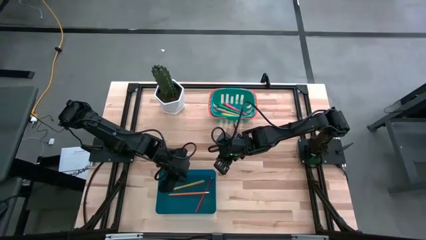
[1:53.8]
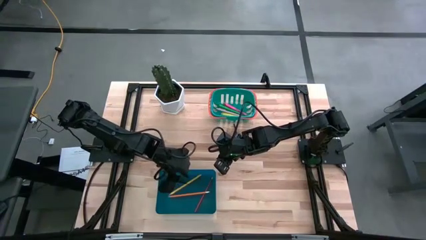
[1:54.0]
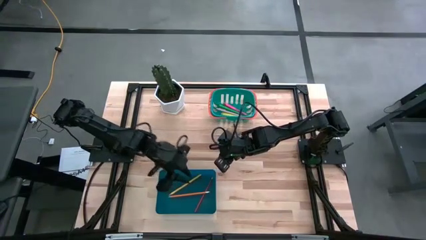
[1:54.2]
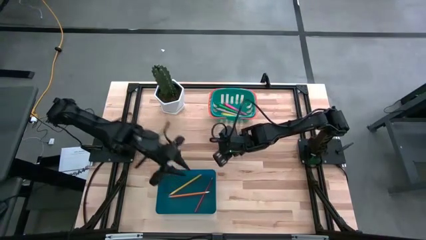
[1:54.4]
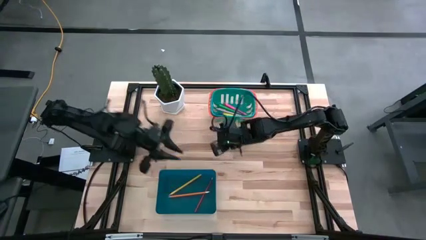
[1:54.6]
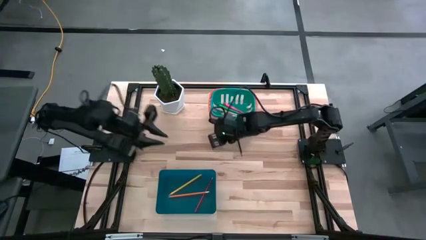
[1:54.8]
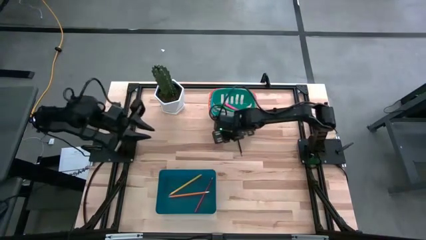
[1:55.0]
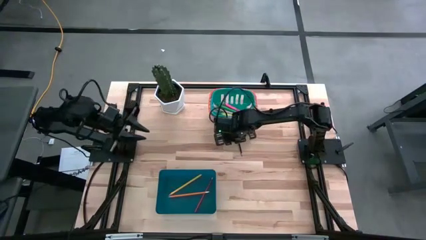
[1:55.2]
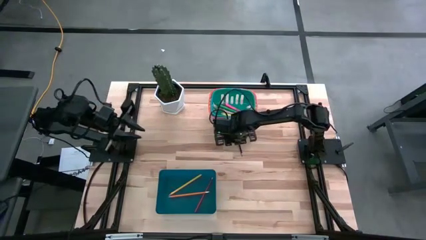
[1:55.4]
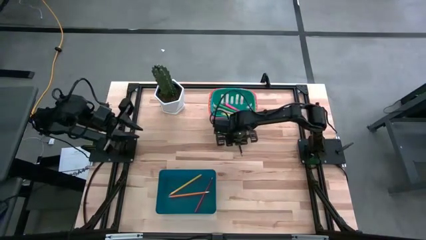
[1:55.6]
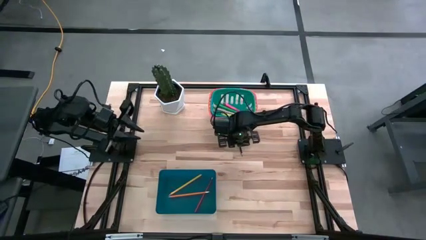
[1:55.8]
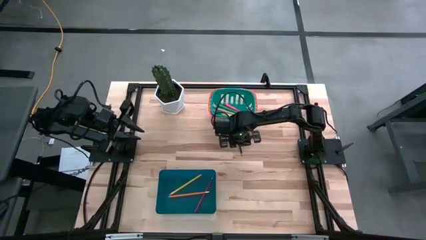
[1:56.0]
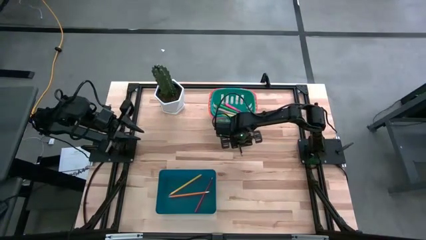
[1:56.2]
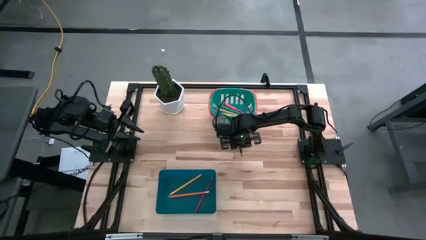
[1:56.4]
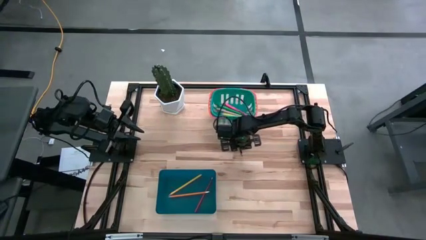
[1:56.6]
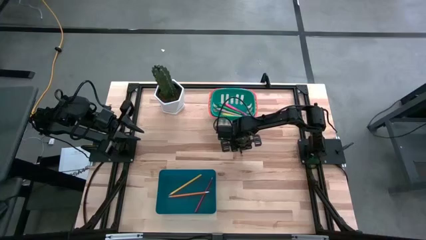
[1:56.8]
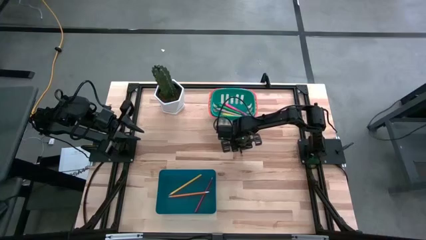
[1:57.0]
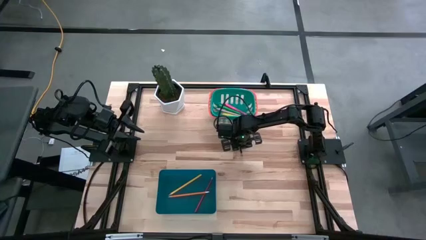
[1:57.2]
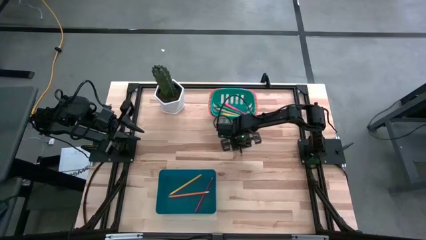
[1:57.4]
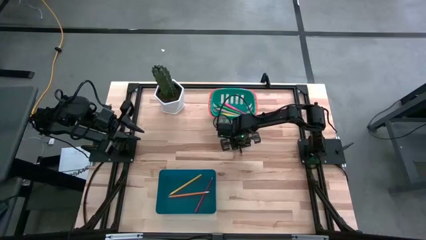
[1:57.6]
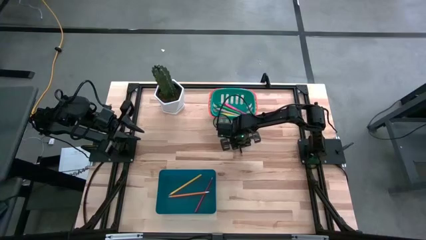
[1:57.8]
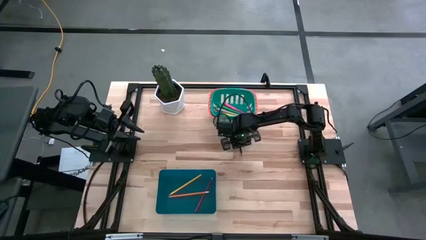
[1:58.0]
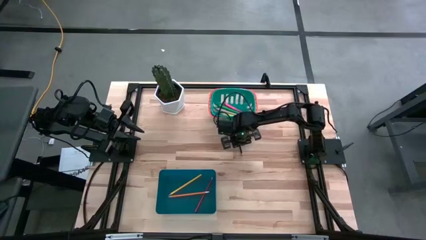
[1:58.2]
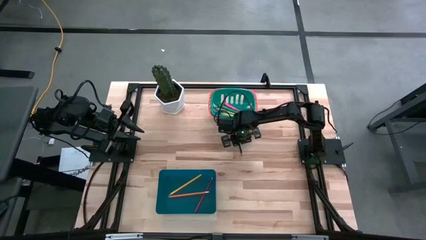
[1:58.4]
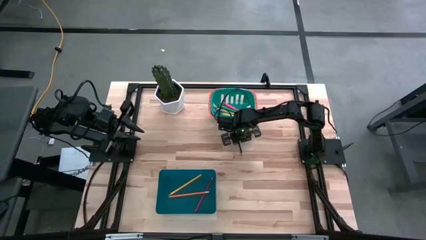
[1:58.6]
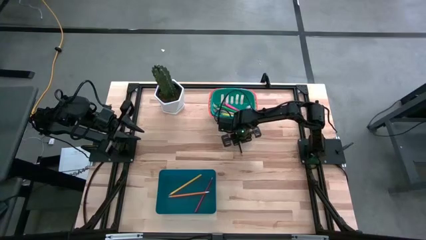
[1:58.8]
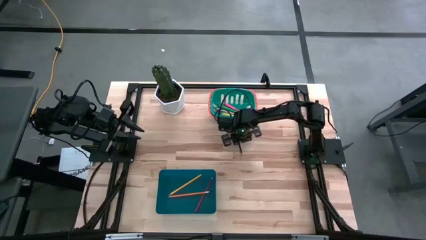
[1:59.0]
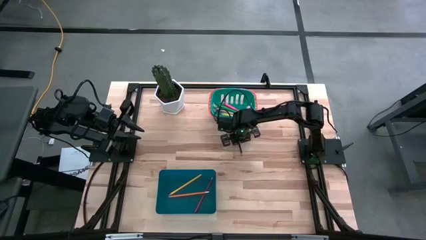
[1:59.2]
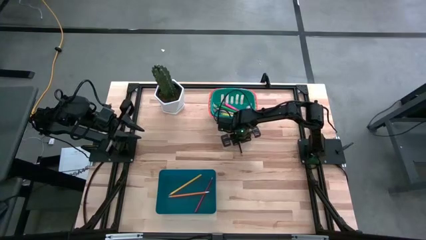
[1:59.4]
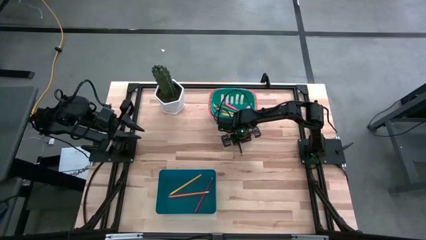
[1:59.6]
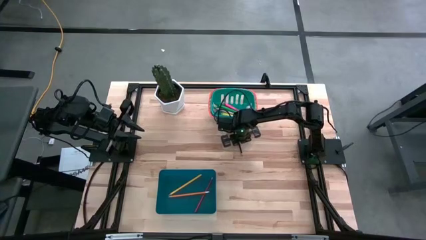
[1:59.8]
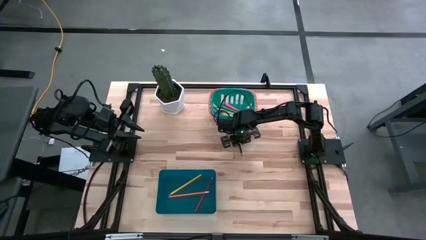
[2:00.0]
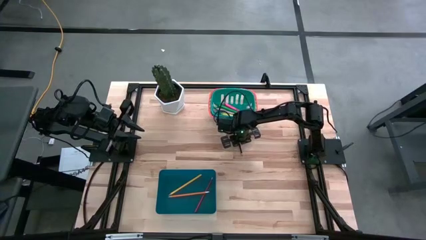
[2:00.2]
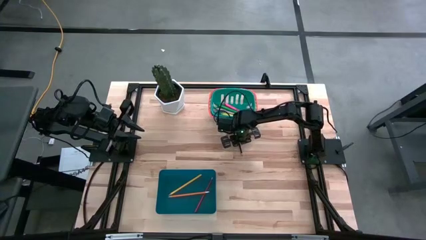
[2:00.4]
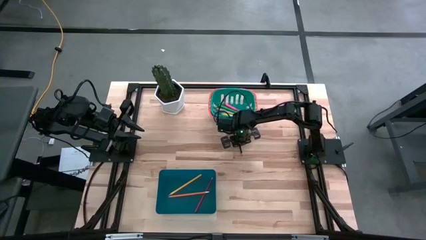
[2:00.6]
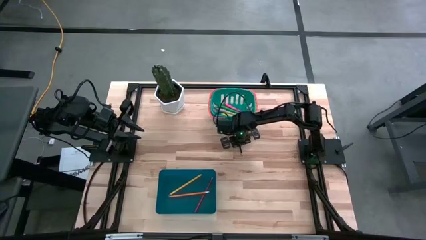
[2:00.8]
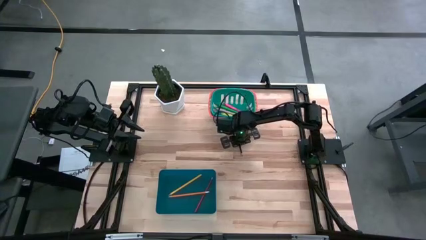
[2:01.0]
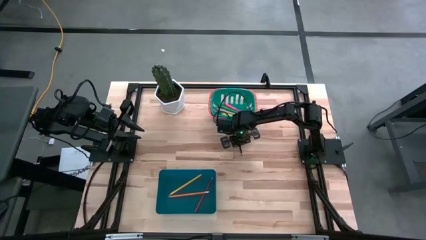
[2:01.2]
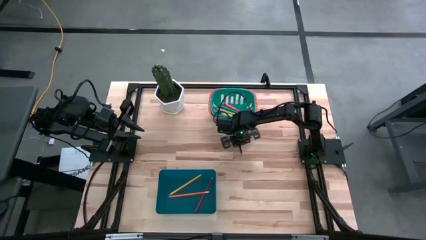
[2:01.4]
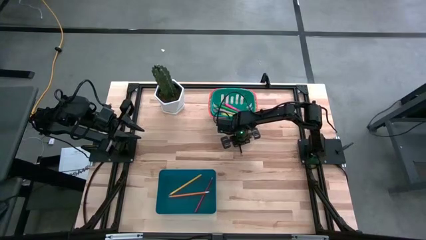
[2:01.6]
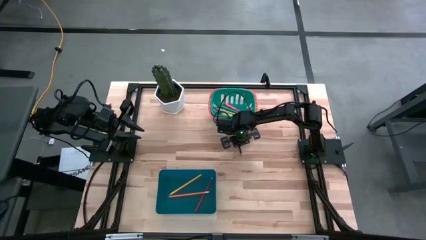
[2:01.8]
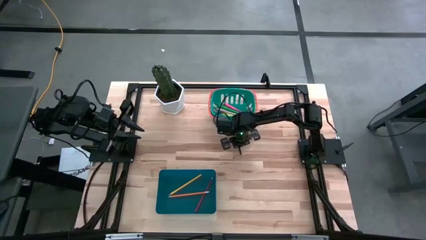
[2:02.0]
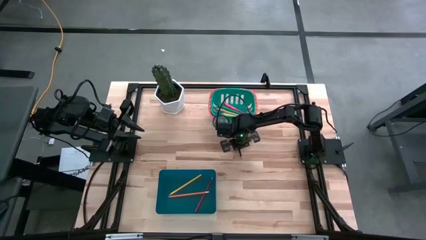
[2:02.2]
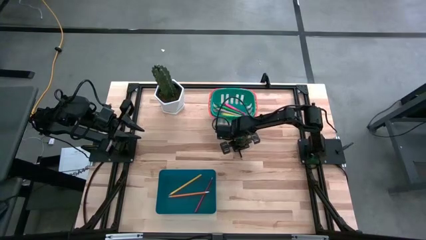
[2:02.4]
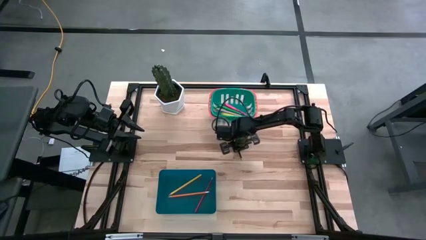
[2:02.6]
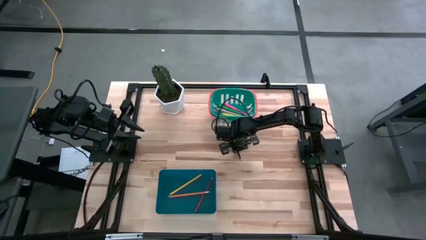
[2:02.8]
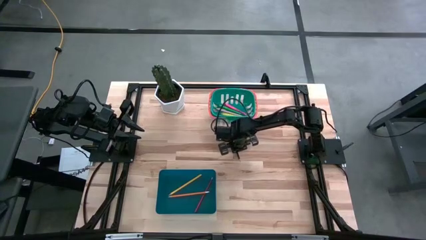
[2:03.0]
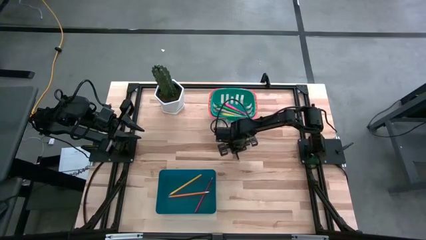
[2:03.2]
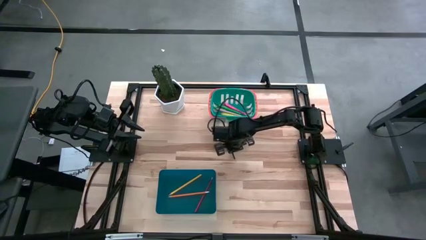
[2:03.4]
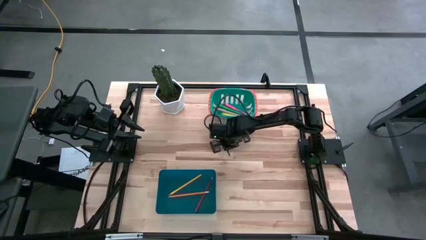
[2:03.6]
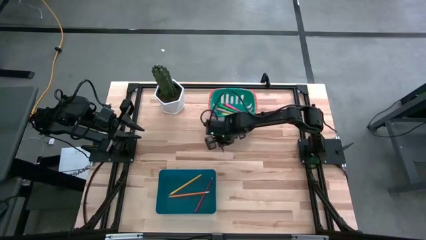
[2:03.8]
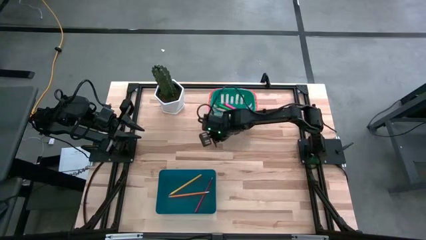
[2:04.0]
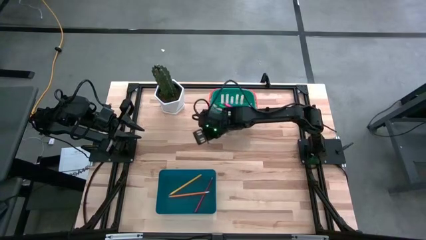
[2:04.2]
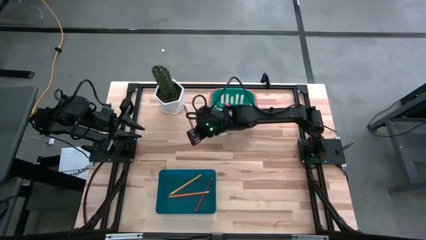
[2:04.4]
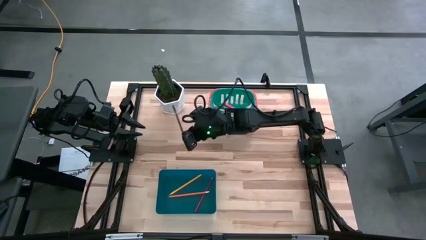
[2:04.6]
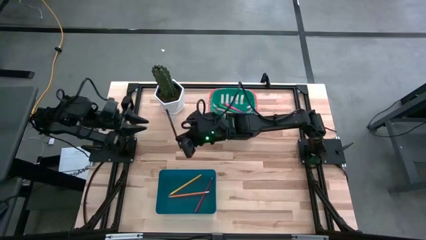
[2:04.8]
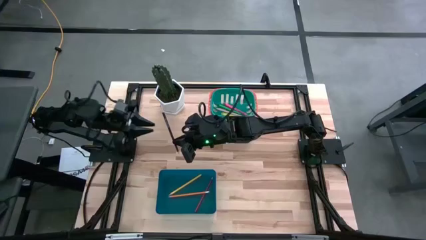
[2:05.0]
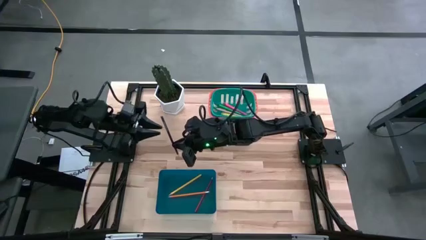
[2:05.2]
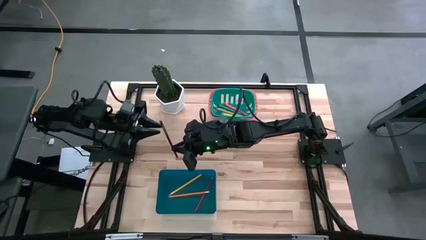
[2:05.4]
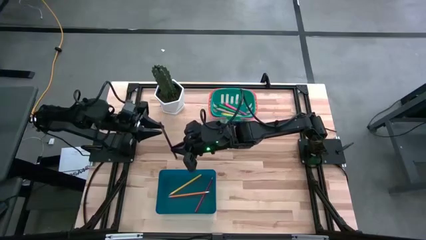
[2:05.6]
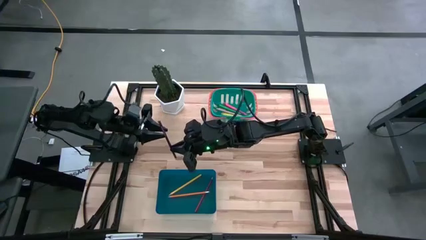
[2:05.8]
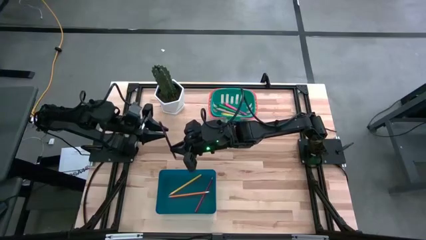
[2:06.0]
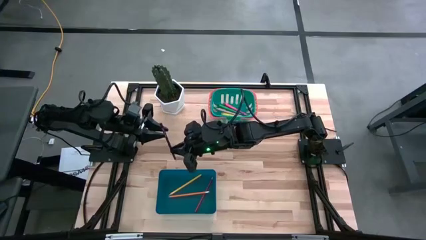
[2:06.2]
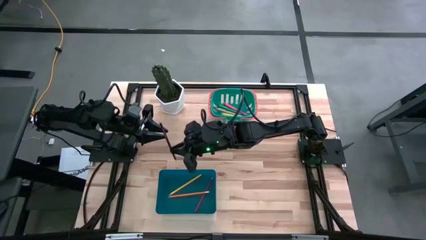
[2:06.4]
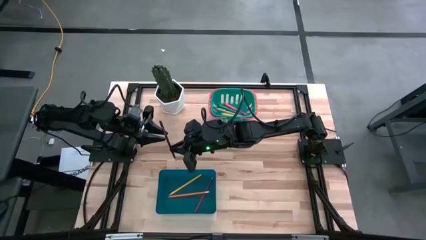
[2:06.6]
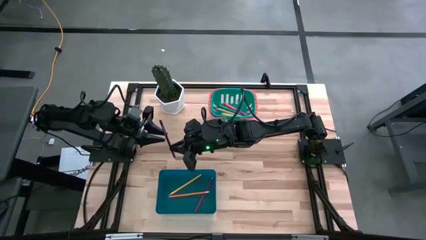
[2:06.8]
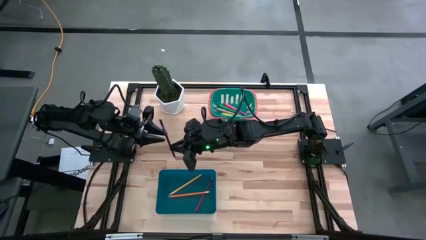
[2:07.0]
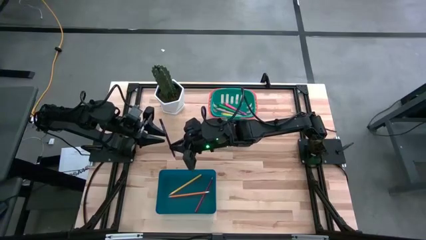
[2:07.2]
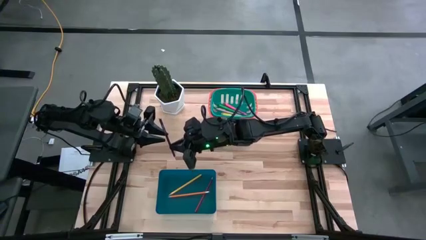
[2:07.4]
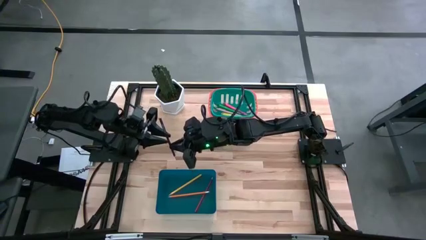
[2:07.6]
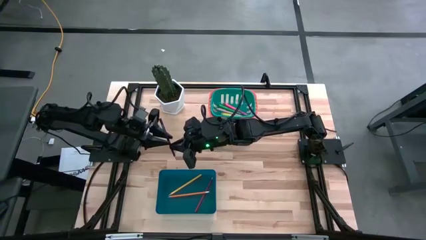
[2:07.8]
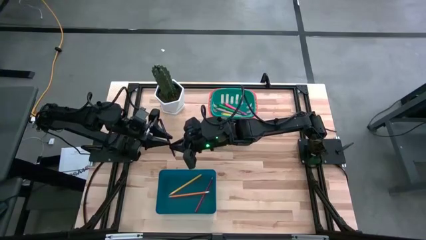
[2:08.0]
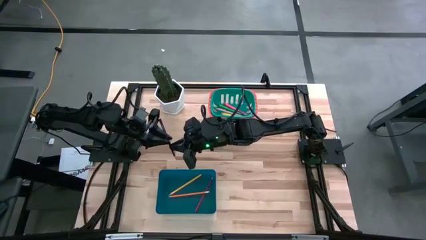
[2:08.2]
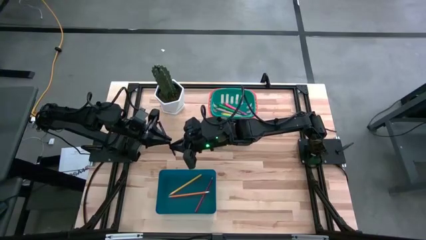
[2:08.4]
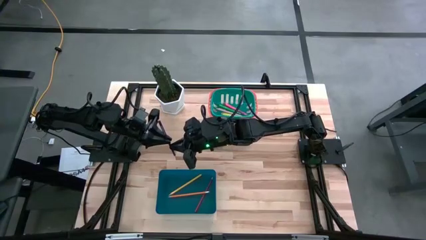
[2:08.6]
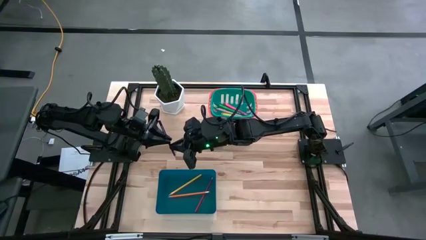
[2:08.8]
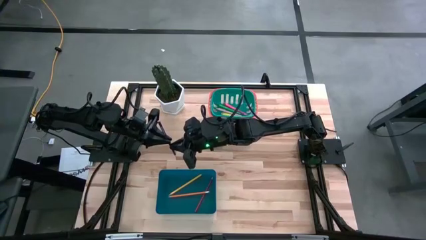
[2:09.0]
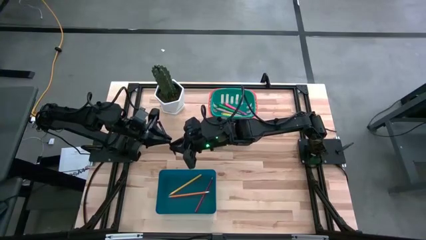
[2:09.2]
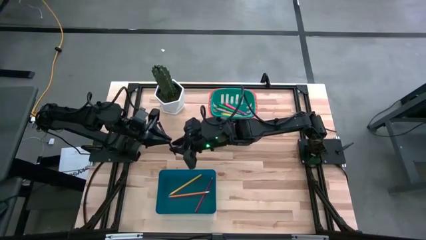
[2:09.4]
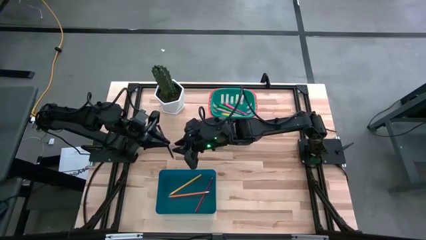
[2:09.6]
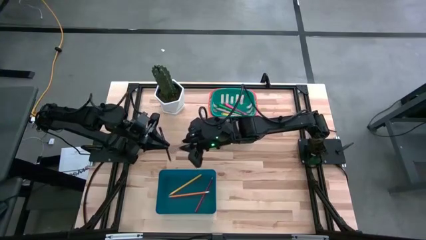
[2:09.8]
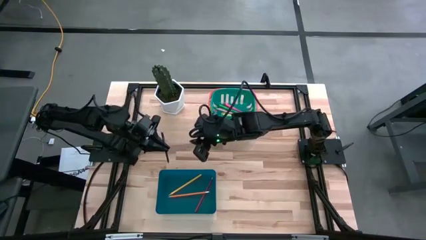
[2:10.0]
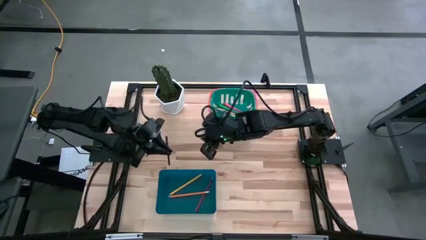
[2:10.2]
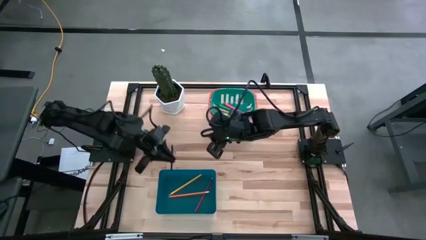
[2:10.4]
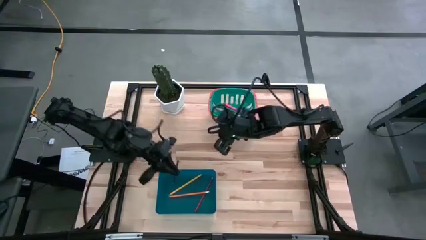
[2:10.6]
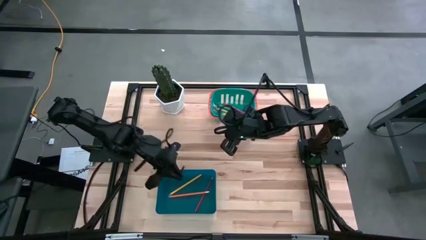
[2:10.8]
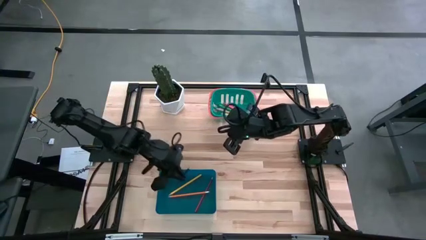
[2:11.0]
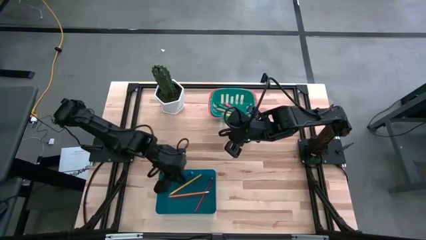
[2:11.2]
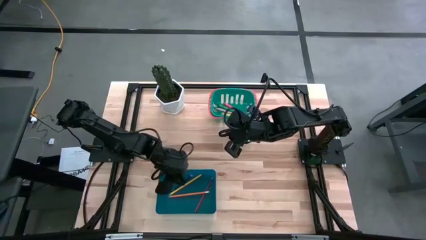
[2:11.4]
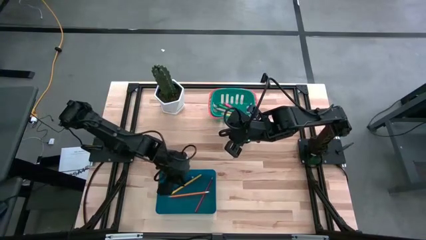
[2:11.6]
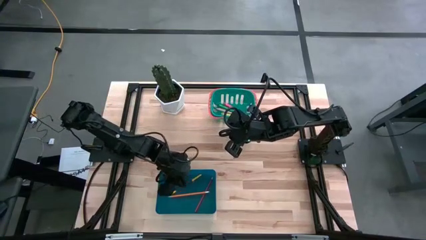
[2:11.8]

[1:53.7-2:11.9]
Task: Sort pens & pencils
Put the blue pencil into the blue bin
